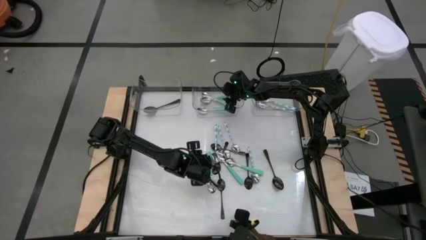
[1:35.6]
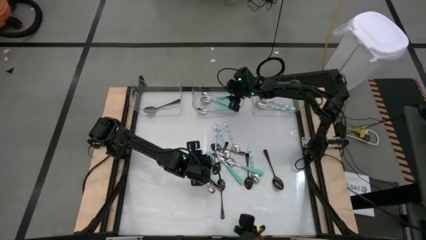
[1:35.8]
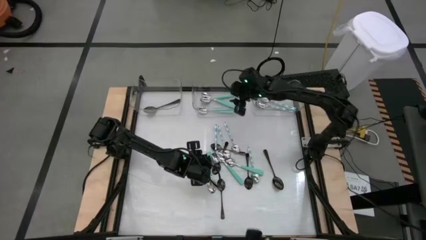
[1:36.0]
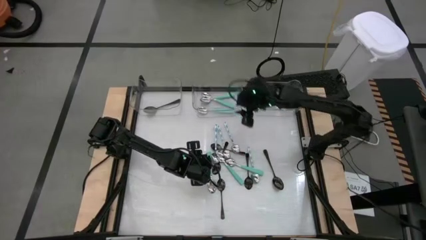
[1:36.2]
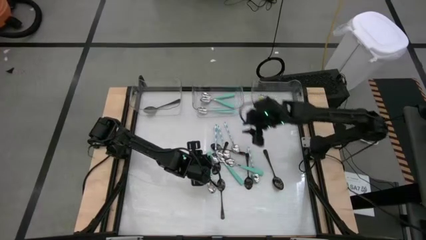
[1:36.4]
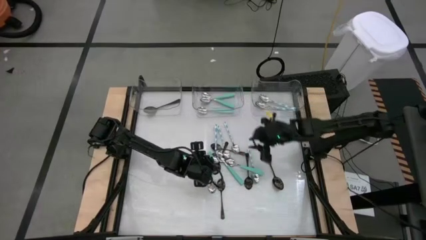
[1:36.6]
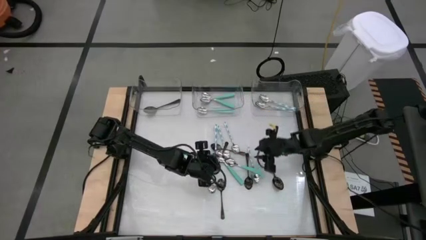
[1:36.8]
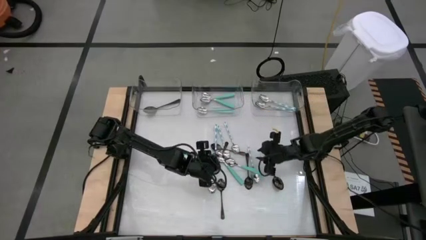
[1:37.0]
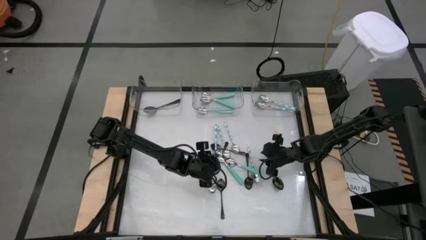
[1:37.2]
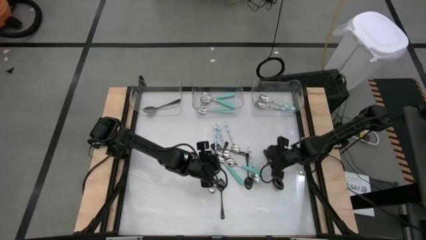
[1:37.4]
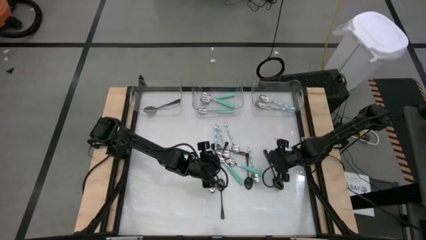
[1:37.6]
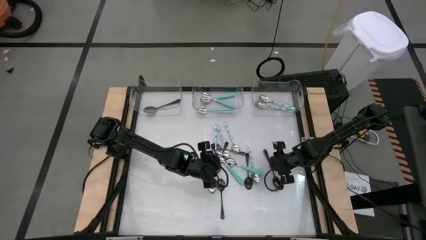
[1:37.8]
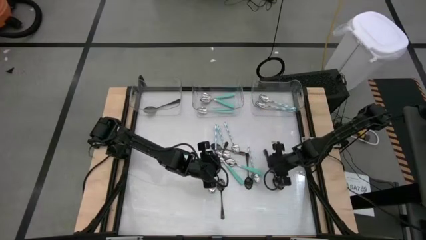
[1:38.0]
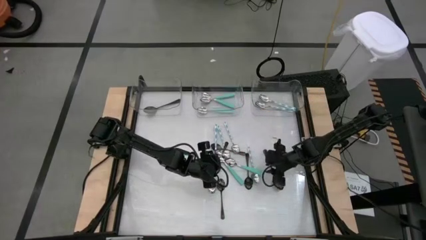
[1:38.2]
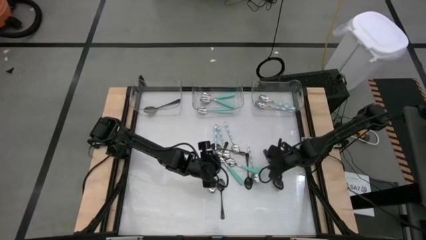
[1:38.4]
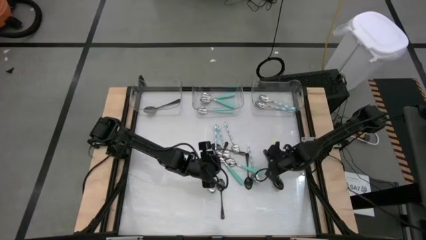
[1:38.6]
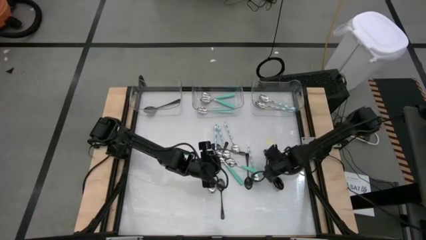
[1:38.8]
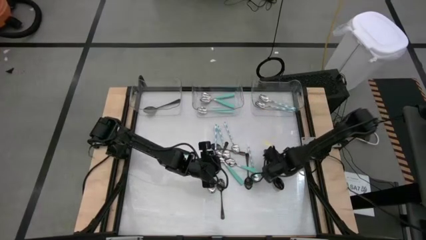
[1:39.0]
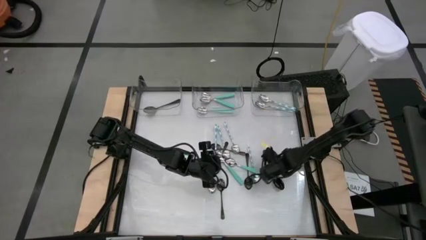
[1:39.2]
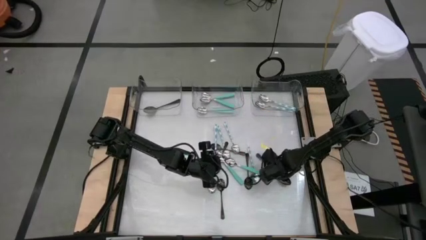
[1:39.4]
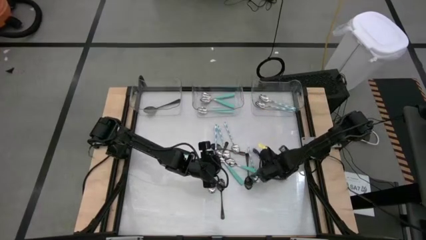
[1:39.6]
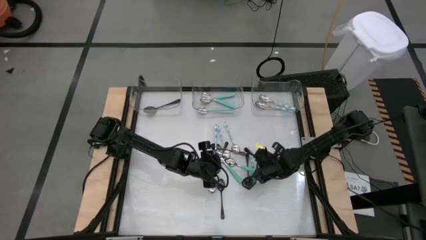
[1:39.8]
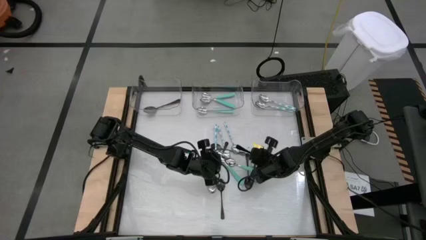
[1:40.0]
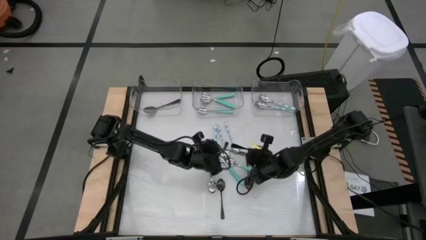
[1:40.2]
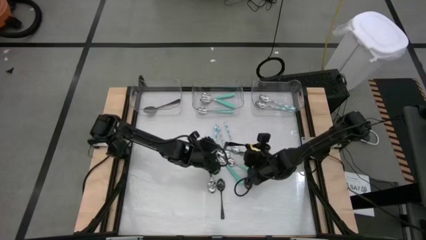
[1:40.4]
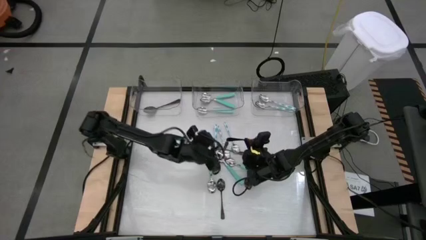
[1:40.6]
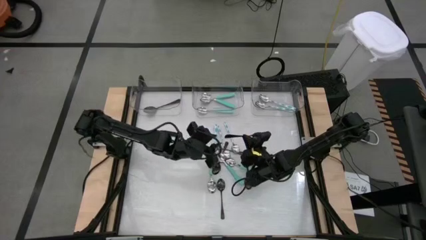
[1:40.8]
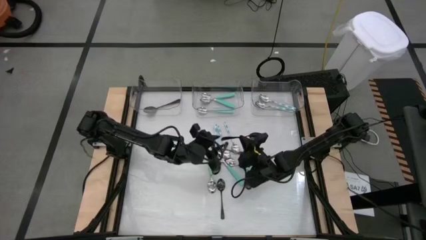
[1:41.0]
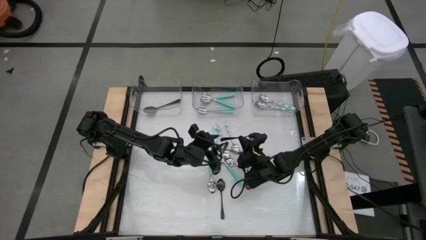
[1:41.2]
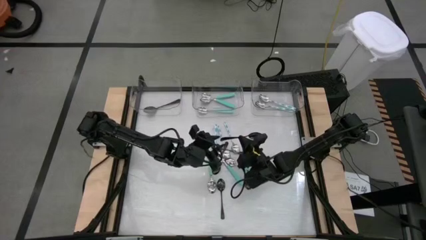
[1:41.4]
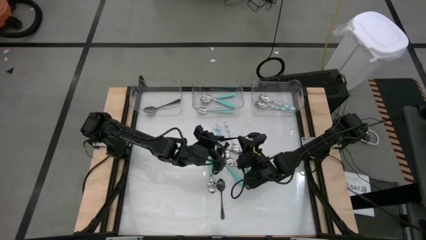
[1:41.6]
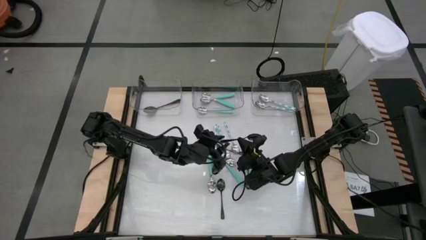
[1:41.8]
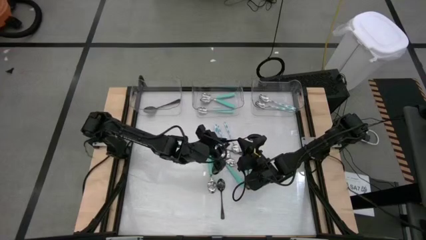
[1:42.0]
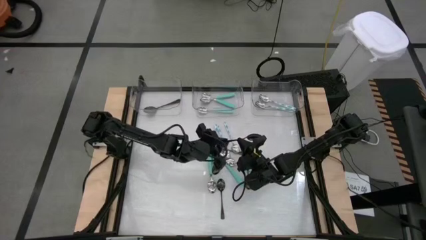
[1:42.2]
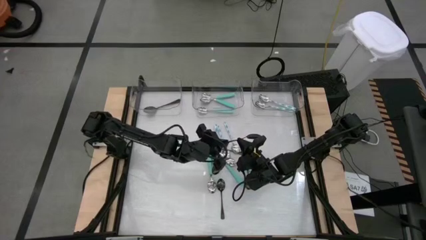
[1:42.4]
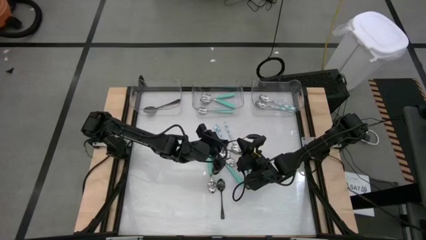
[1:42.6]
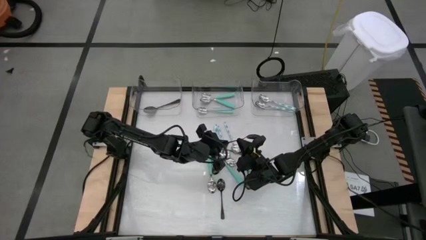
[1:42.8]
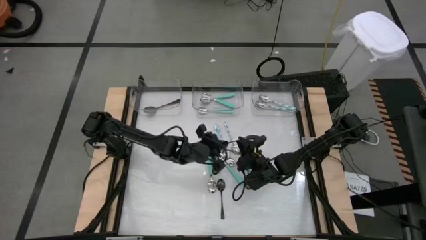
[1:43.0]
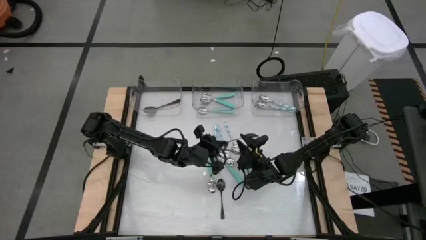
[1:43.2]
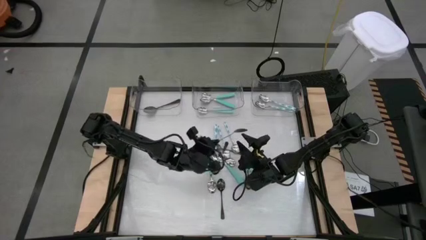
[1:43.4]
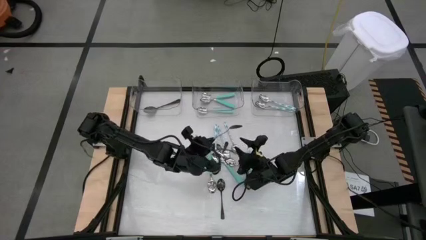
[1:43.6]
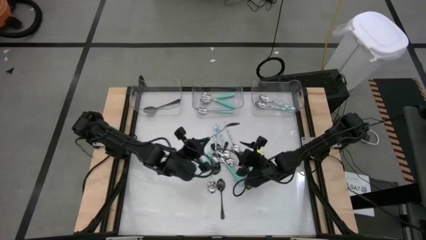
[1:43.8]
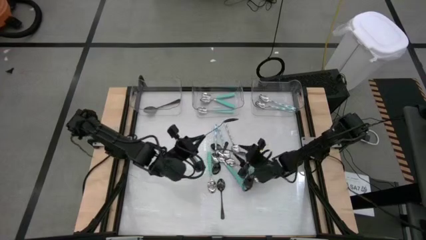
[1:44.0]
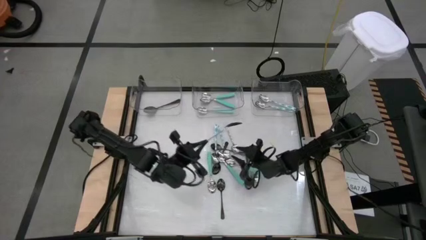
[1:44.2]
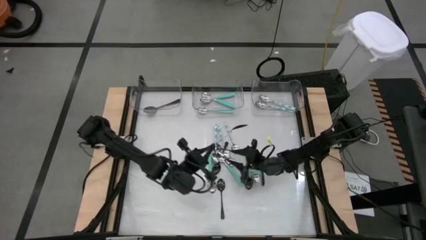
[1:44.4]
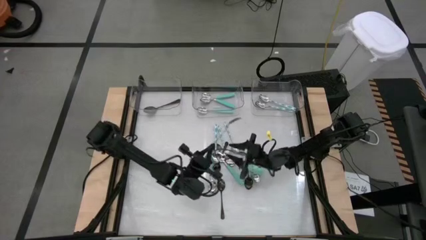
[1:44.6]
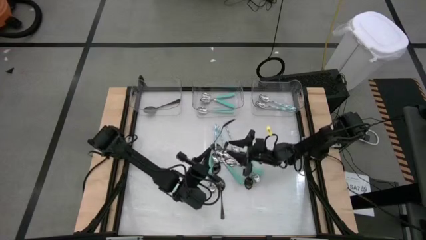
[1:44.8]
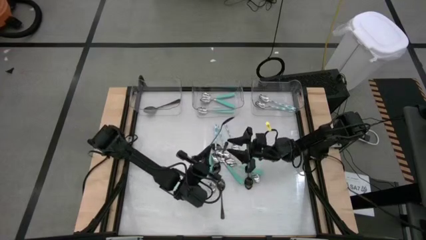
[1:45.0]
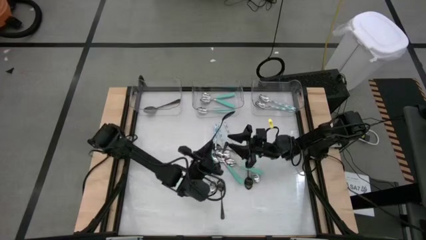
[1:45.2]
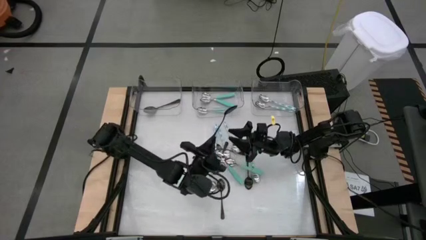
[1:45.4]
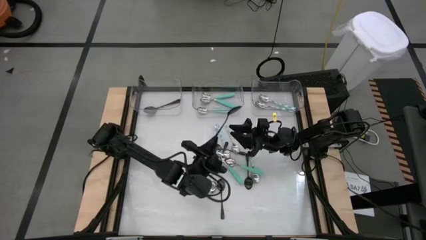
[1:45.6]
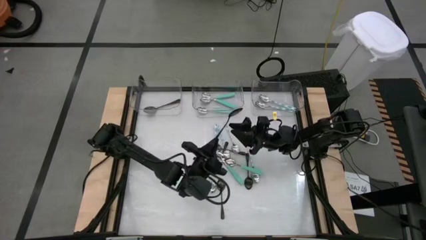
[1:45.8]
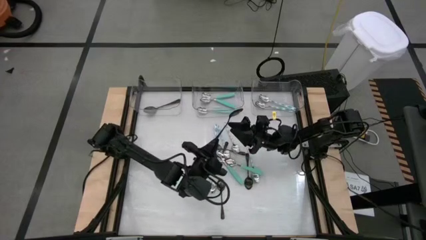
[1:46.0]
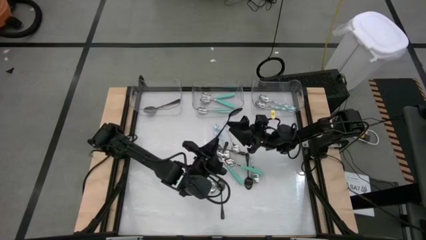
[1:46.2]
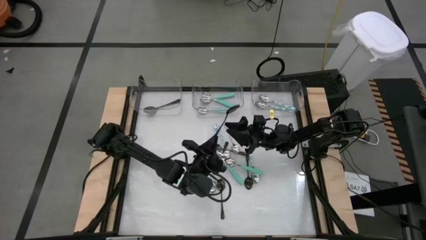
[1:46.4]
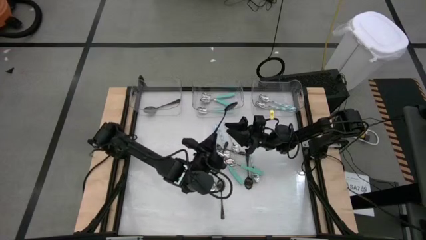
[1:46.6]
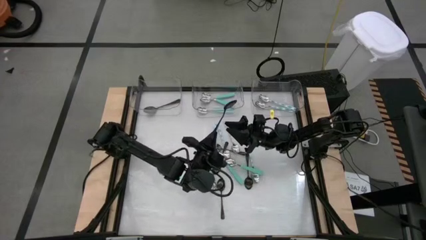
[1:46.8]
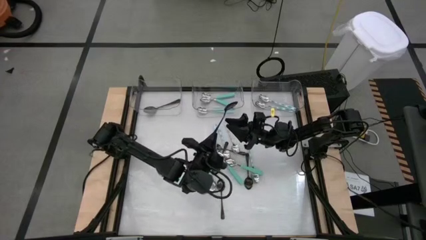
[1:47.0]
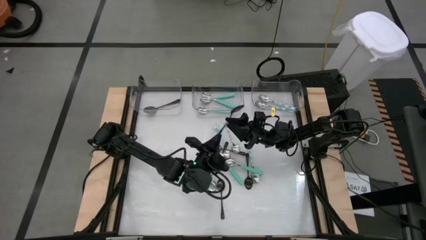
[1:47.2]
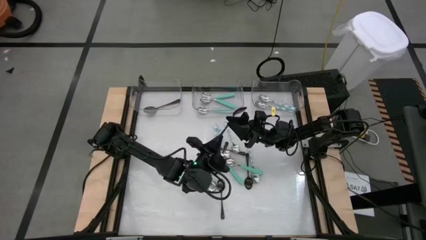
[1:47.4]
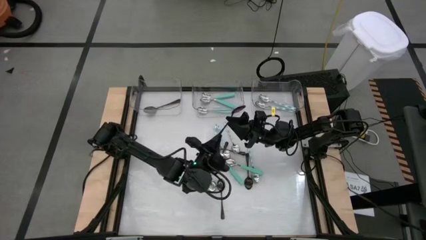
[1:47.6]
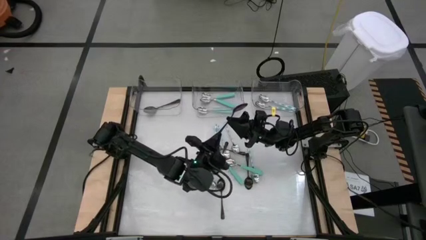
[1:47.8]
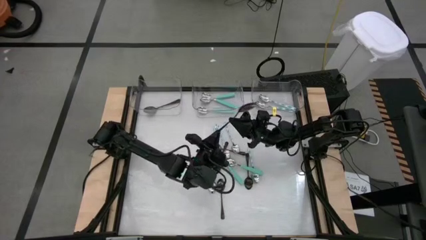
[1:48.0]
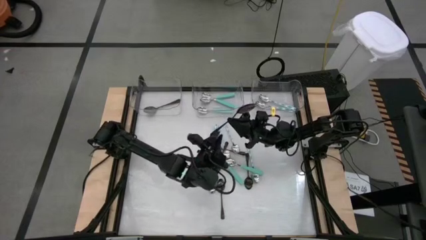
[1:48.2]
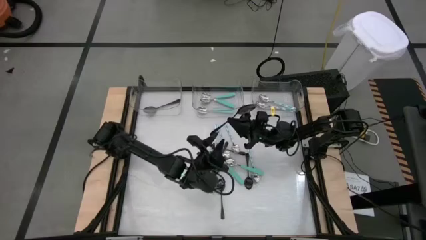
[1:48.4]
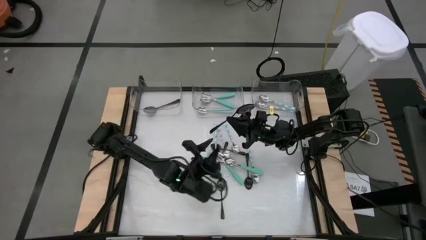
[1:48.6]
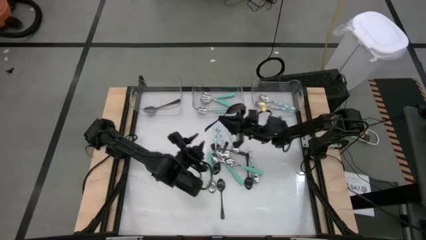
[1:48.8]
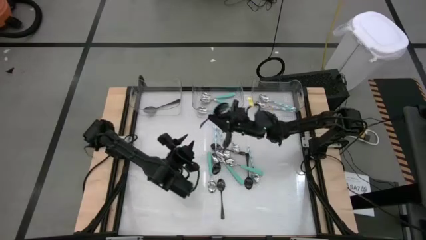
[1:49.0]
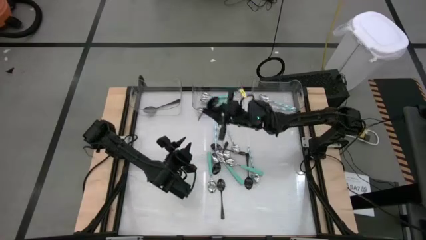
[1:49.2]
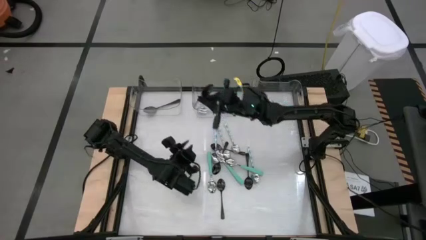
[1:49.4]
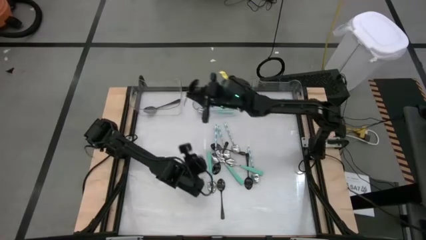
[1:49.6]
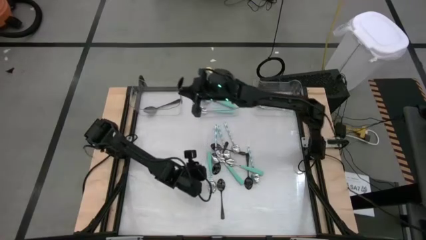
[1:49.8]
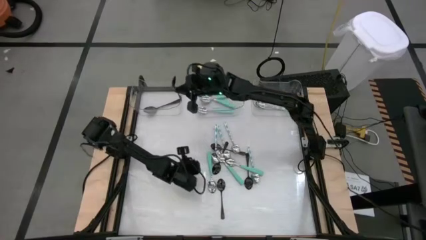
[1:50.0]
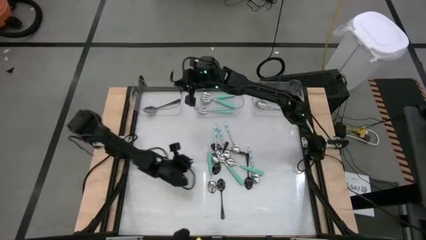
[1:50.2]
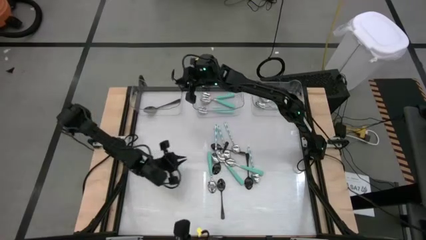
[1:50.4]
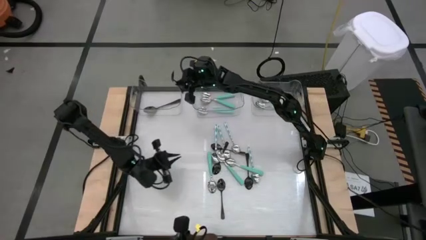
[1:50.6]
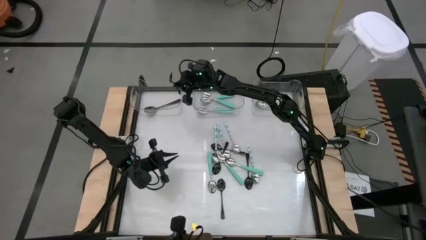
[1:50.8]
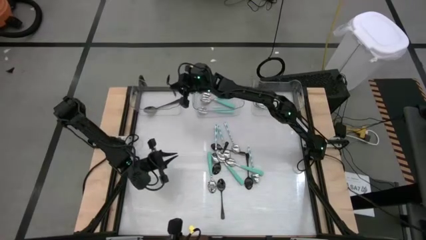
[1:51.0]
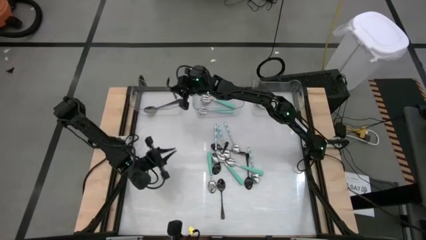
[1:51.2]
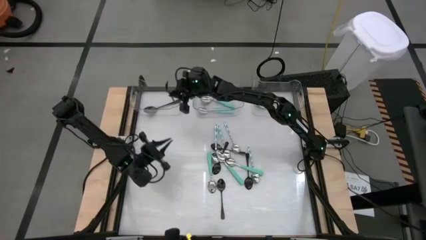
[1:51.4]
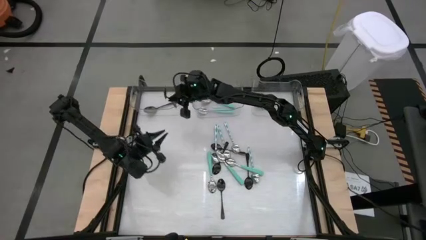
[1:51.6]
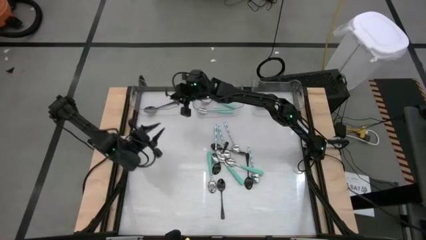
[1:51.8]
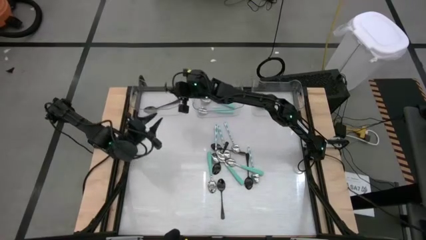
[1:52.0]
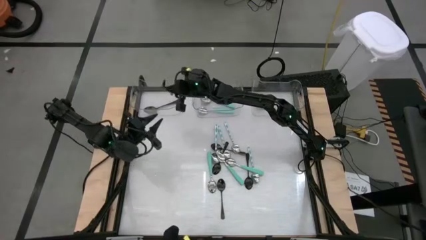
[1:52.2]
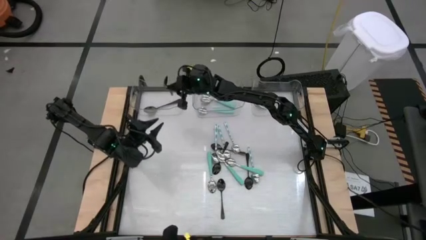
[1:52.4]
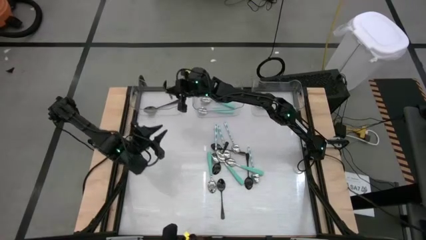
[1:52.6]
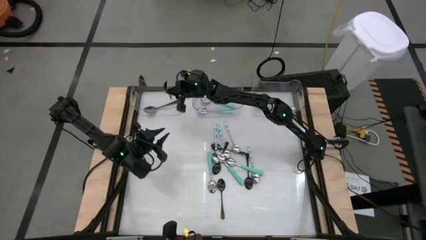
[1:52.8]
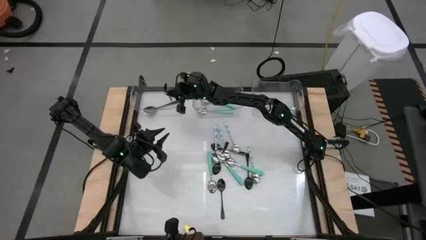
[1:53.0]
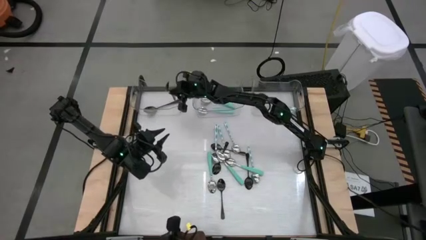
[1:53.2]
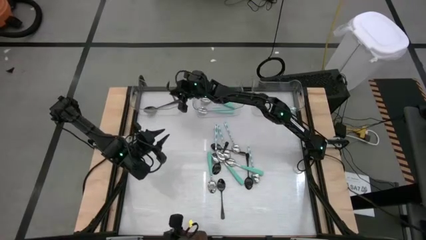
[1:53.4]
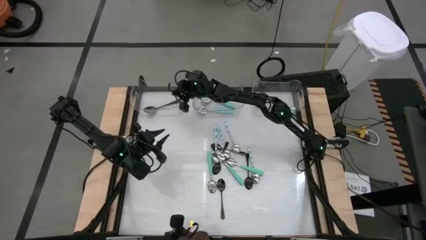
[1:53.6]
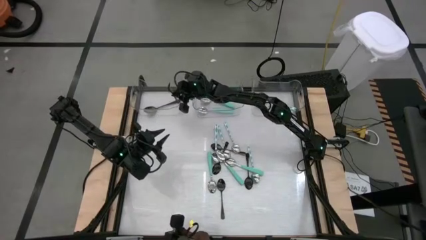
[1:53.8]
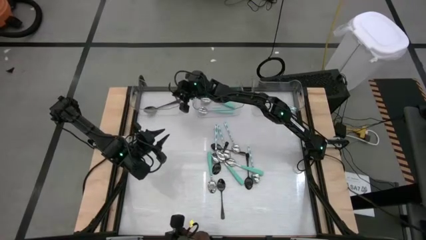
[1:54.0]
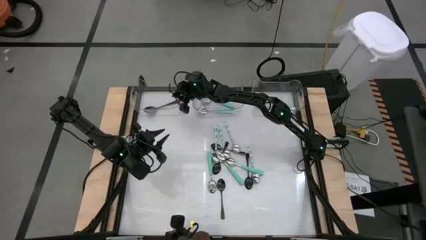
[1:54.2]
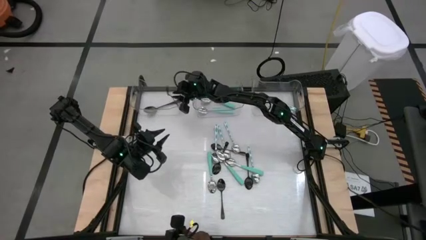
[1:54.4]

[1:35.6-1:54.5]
Task: Sort silverware by color (type)
Put the black spoon into the left transparent bin
